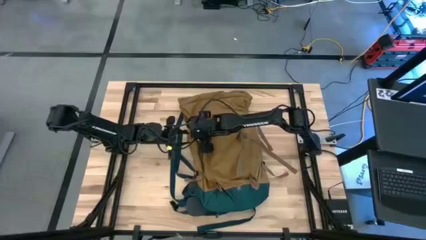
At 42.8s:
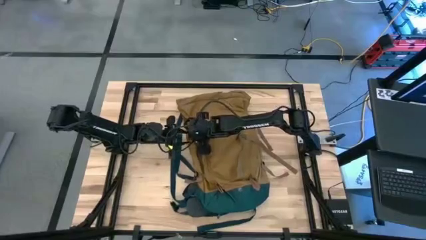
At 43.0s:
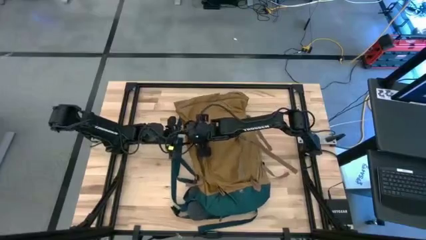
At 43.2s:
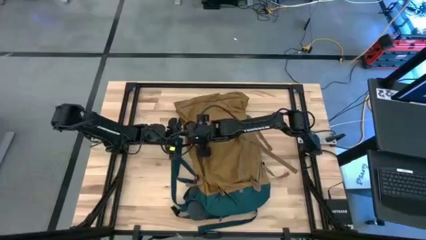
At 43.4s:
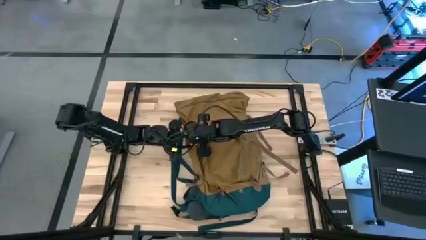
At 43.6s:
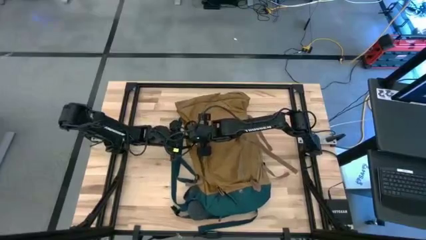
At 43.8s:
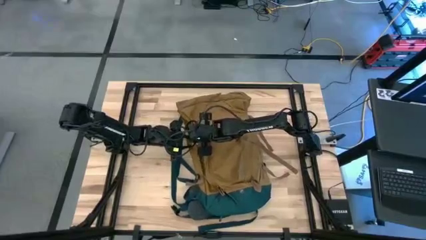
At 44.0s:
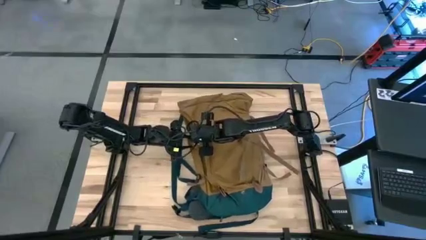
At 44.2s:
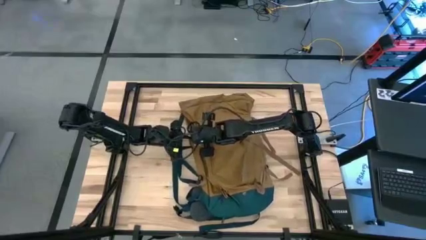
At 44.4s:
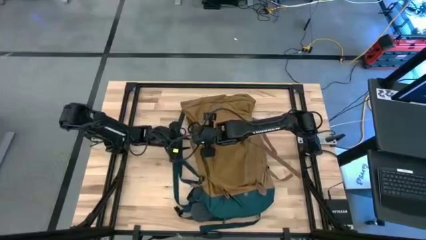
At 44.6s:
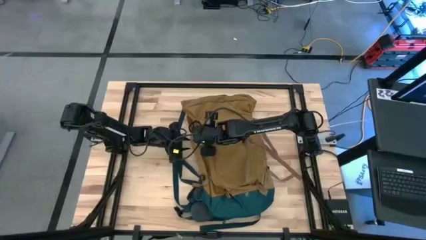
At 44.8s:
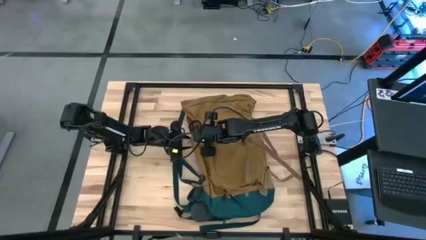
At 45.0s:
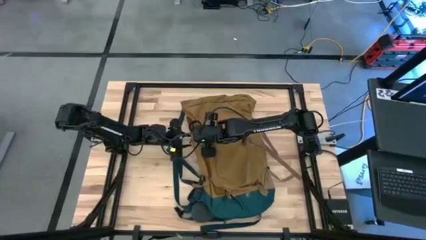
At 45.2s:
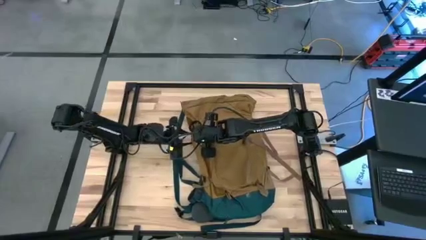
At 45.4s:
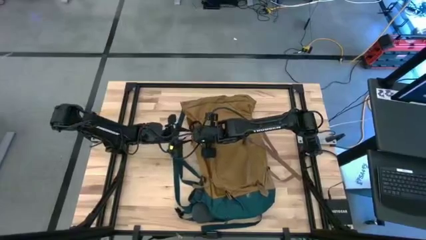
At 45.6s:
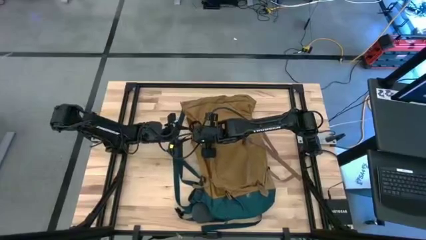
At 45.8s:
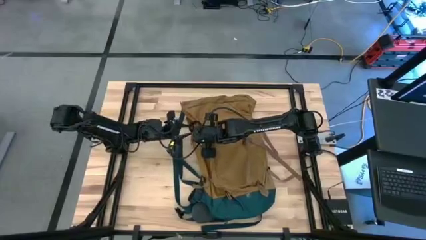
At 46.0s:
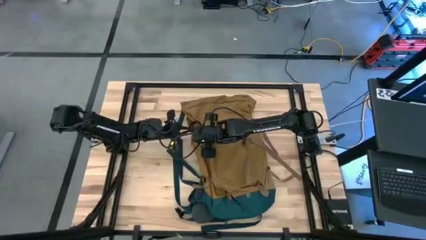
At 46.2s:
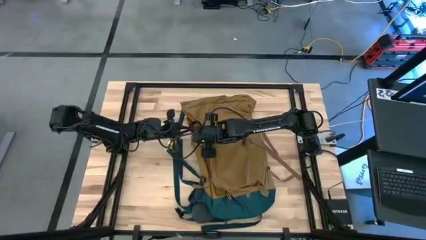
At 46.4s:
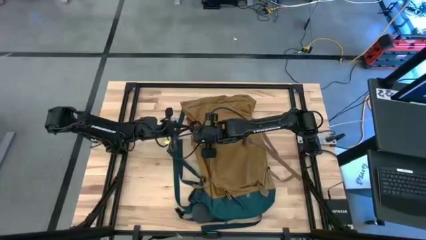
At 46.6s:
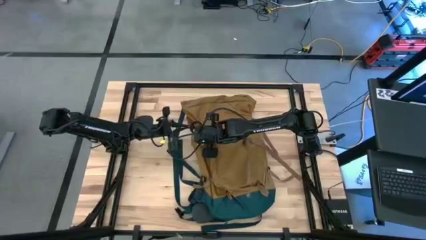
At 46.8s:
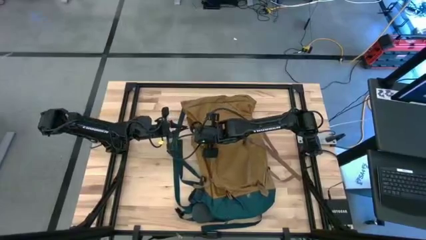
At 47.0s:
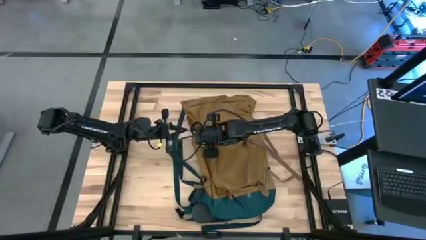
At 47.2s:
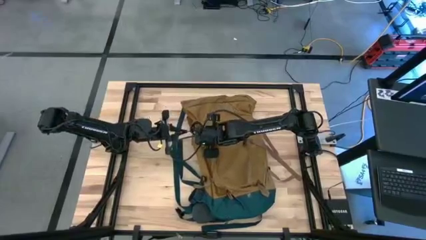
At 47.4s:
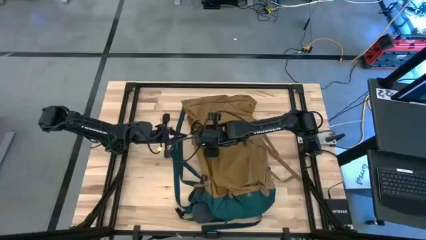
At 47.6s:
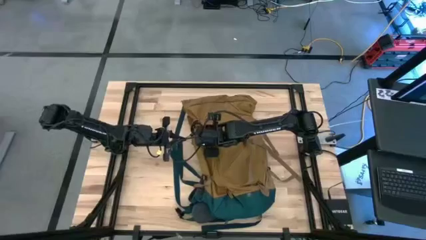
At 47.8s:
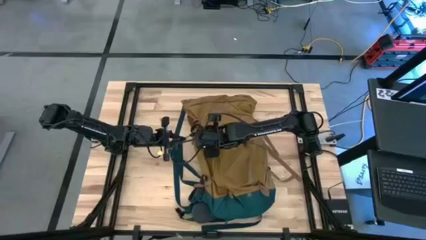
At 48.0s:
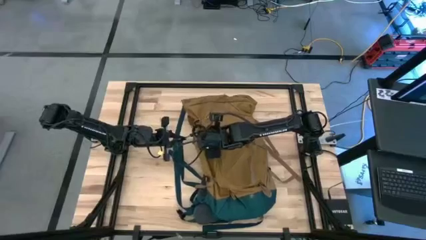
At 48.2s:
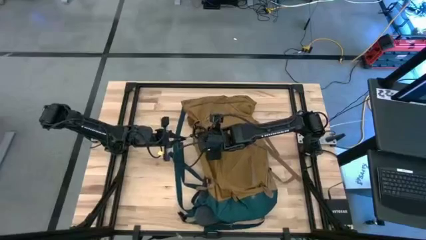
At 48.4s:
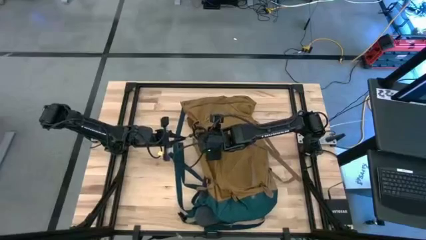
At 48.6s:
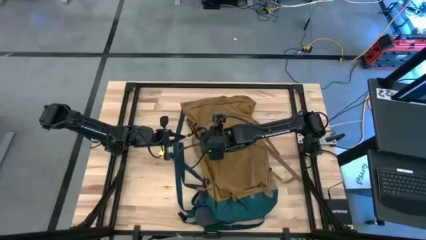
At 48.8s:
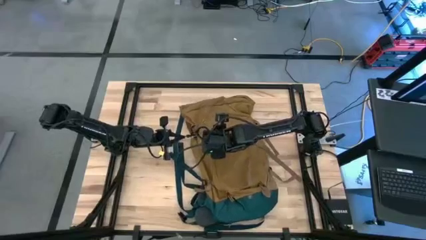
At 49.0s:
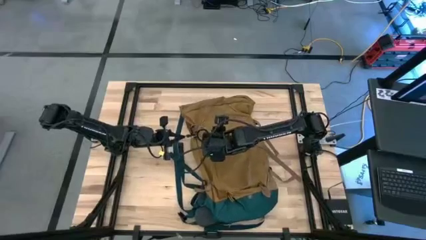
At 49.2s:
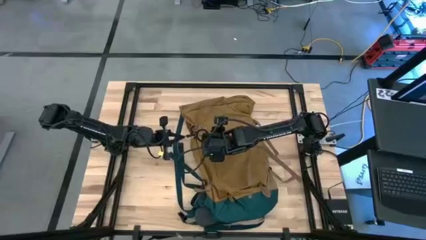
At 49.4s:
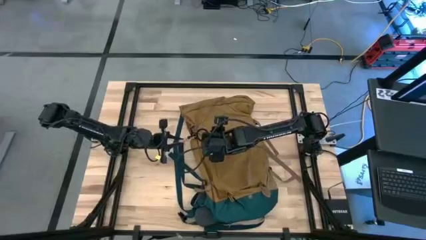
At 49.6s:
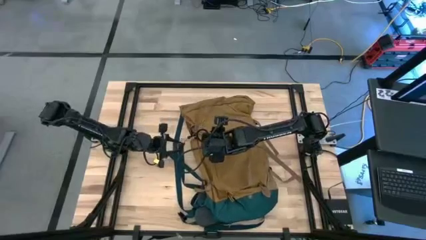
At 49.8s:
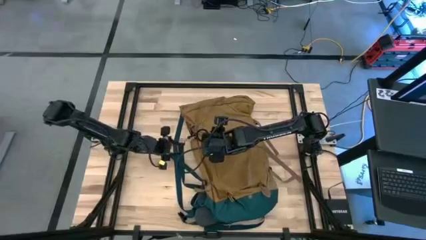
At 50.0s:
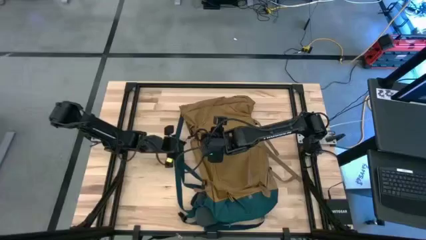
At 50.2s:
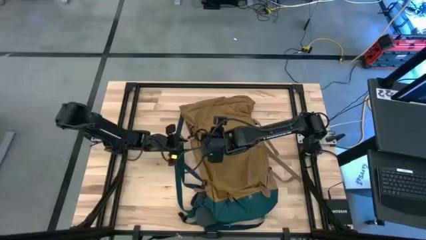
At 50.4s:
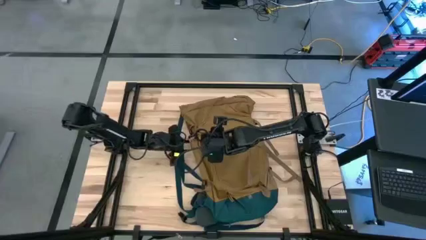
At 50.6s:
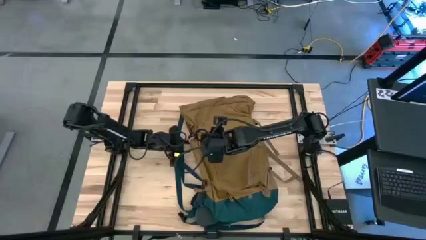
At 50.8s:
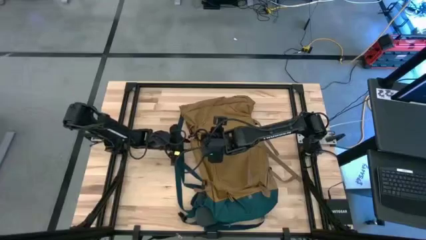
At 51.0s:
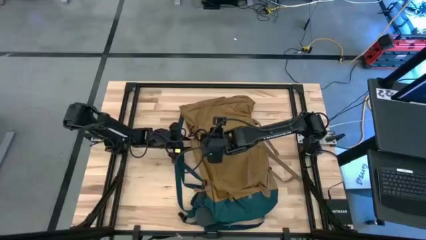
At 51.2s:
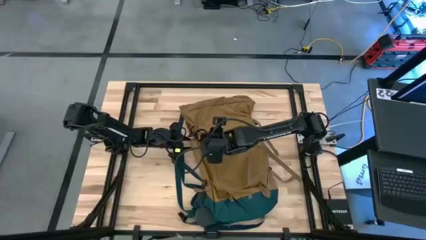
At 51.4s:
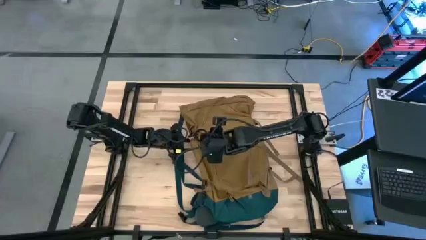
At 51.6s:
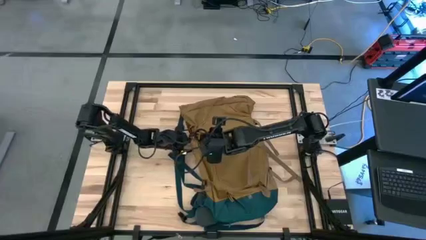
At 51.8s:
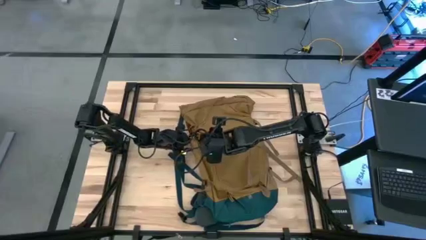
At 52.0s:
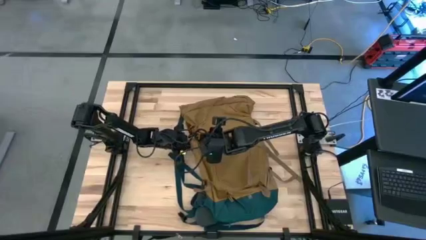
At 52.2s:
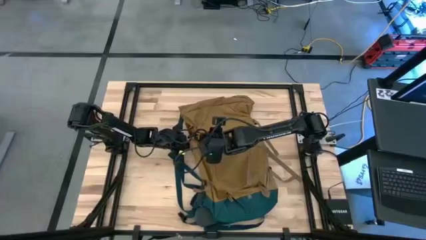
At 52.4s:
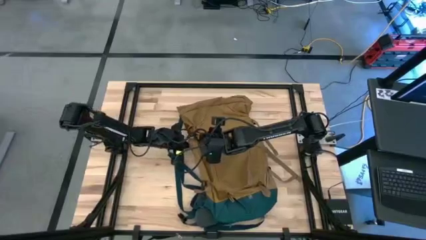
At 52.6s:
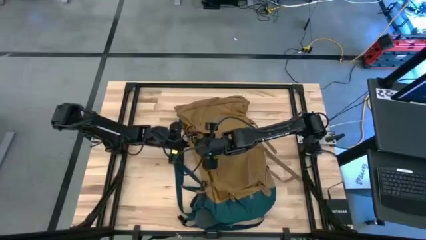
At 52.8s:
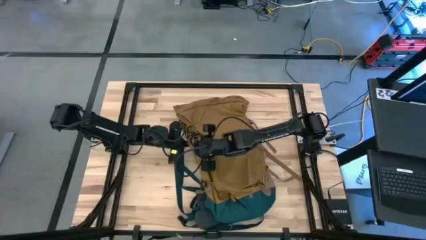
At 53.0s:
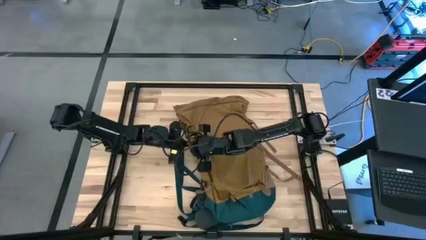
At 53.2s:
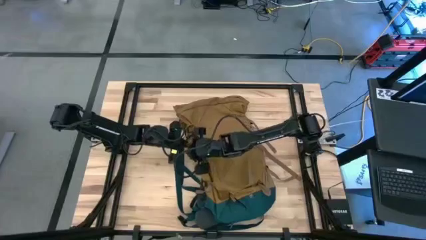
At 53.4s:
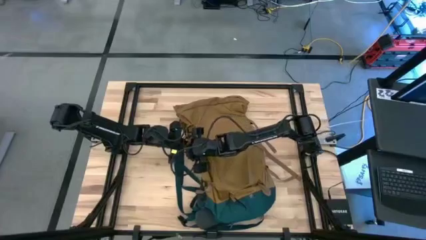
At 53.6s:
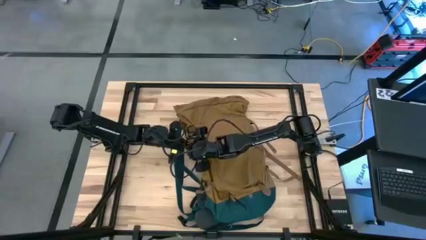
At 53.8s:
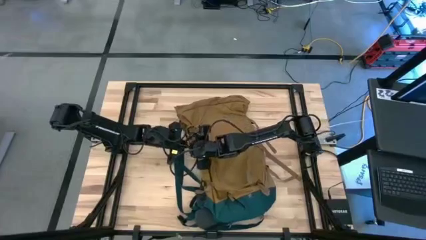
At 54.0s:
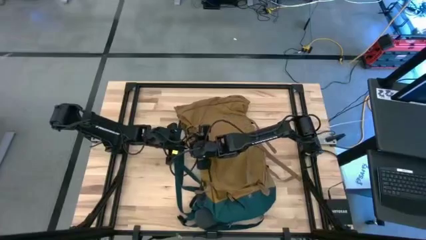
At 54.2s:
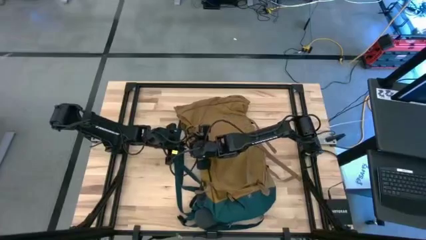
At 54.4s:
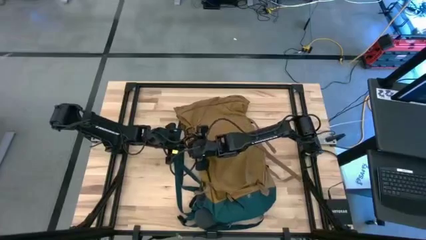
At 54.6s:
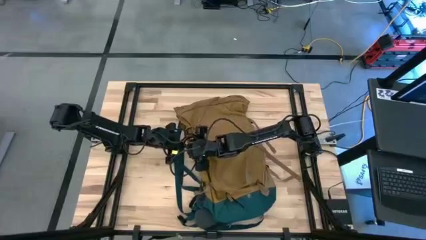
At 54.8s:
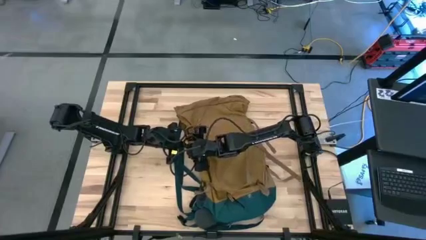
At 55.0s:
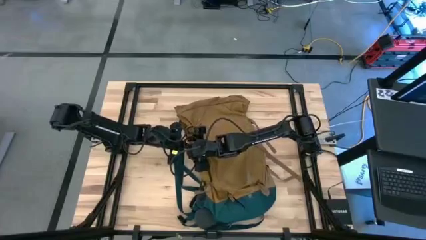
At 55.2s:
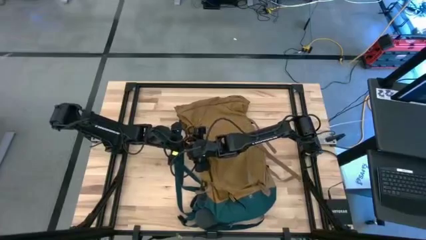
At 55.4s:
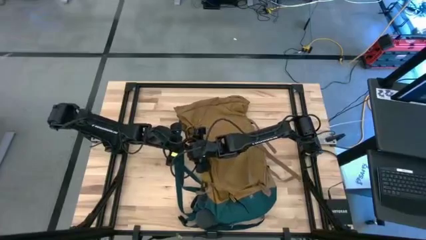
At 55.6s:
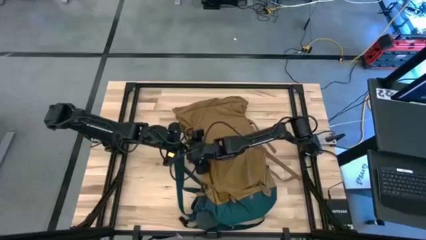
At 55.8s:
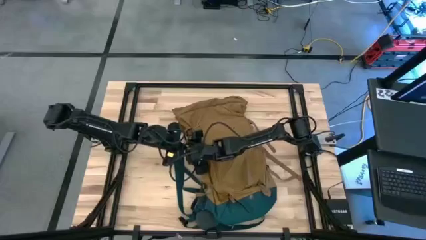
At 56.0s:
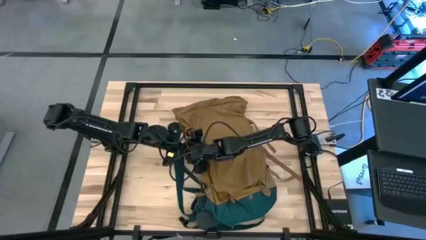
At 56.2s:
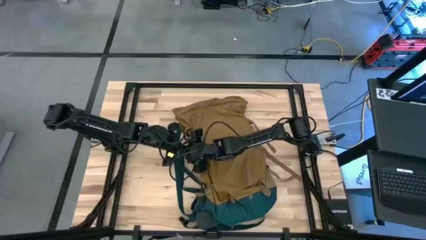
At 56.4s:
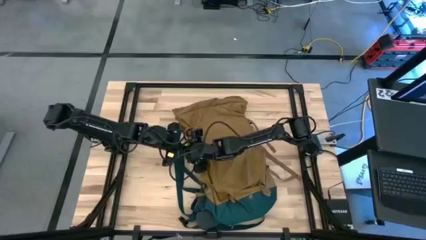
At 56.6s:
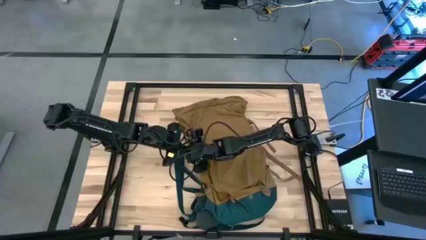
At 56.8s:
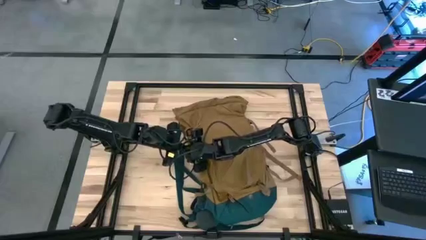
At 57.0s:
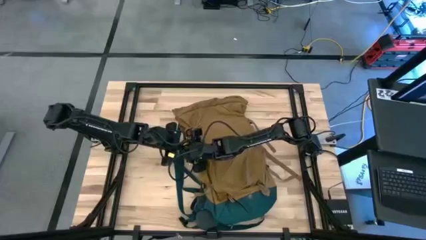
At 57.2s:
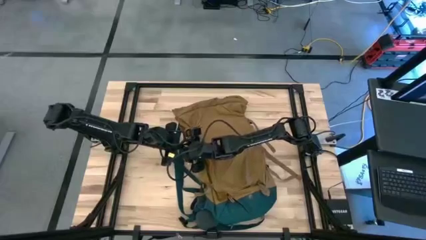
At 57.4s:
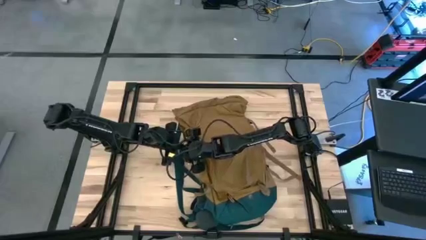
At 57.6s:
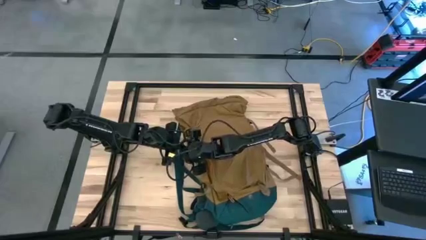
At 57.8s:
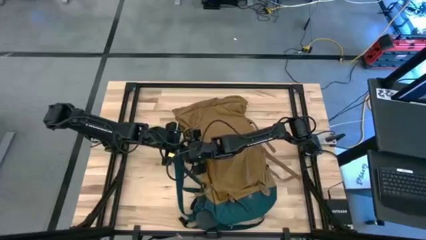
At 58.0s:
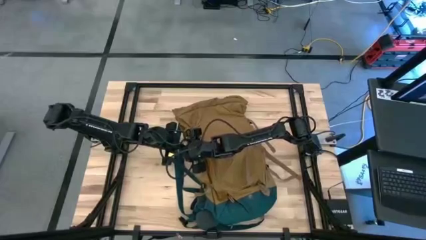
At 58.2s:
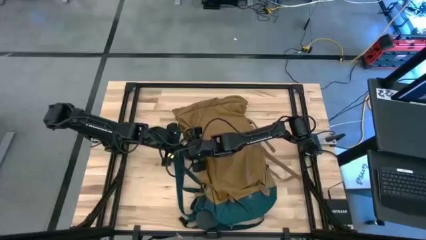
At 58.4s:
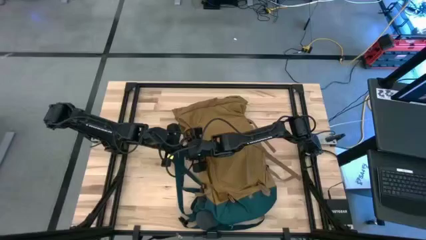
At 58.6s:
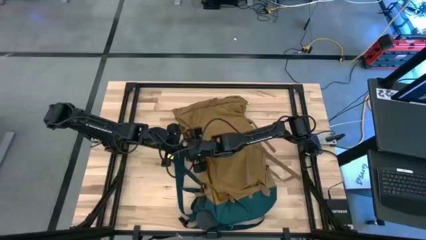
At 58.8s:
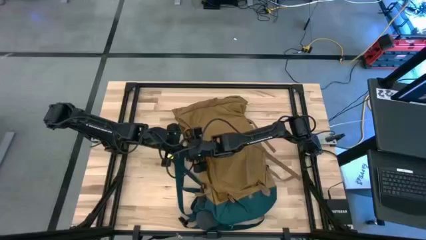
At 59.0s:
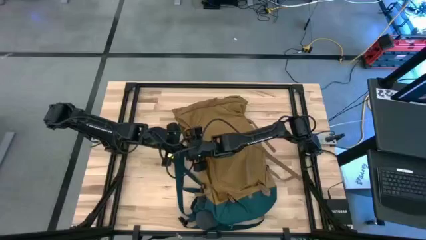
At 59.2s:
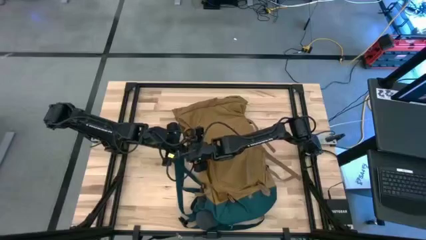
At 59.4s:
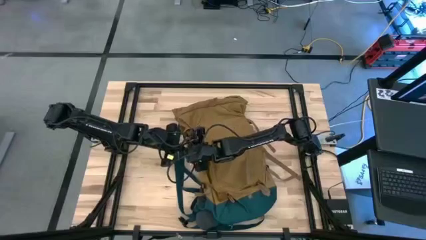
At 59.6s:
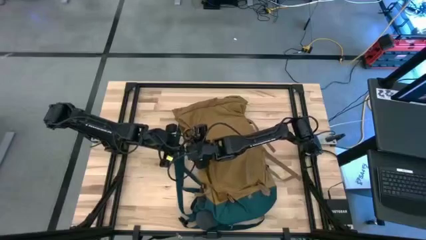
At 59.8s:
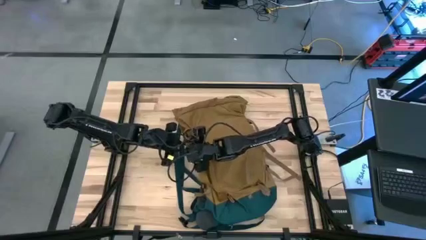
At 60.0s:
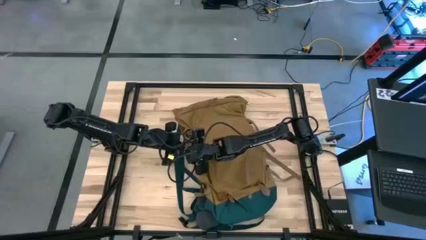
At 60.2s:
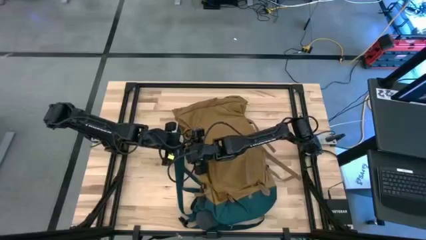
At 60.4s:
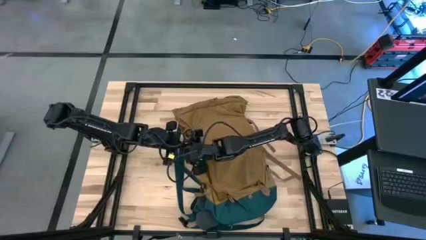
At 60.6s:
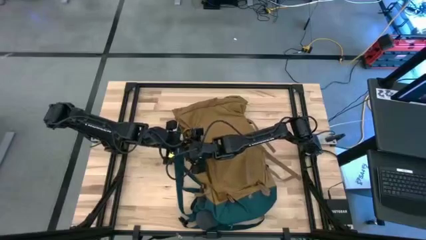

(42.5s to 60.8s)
Task: Unpack backpack
Open the brown backpack
